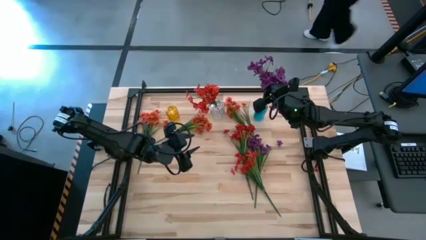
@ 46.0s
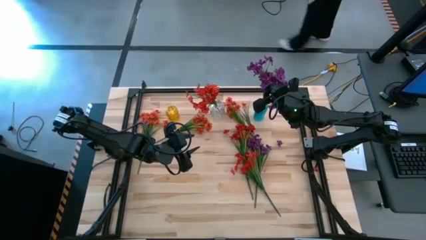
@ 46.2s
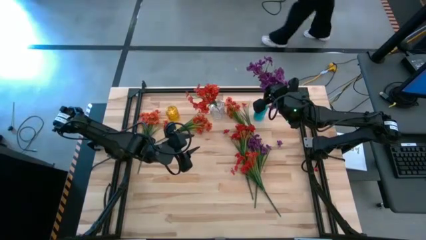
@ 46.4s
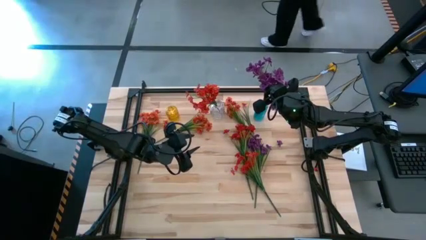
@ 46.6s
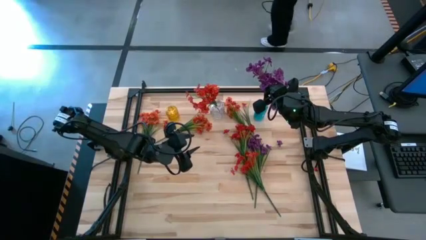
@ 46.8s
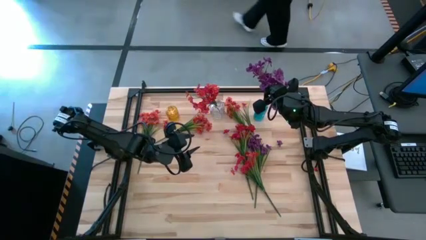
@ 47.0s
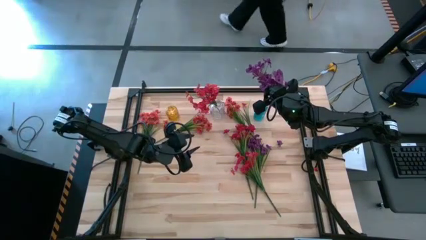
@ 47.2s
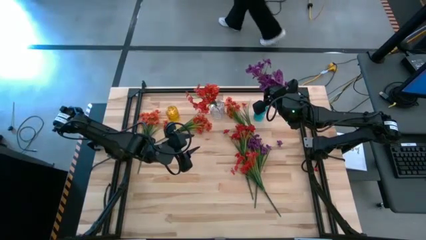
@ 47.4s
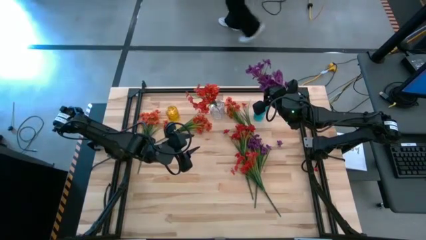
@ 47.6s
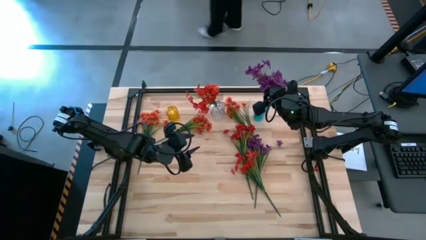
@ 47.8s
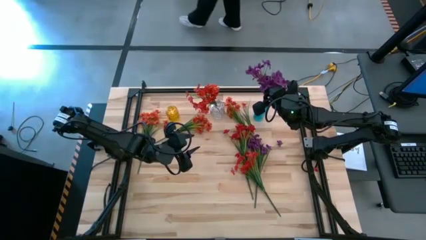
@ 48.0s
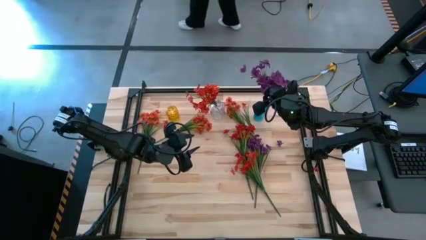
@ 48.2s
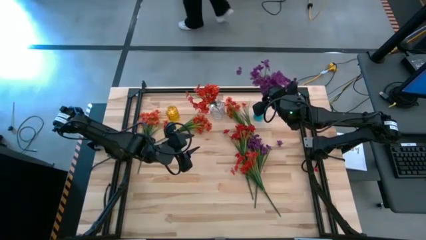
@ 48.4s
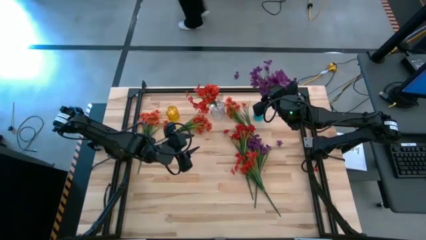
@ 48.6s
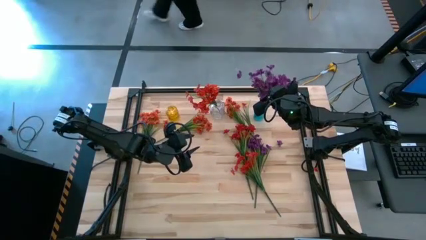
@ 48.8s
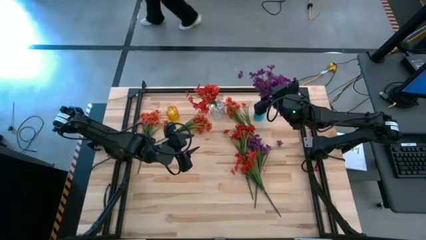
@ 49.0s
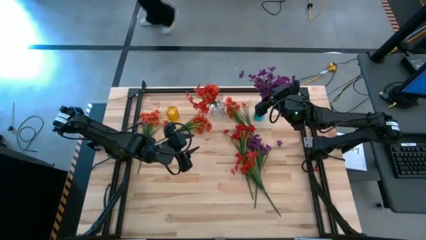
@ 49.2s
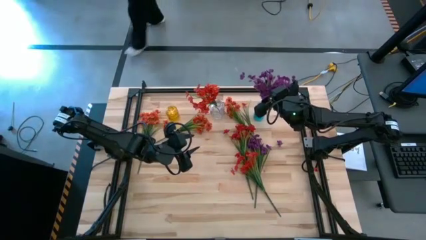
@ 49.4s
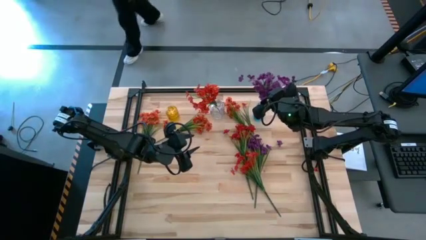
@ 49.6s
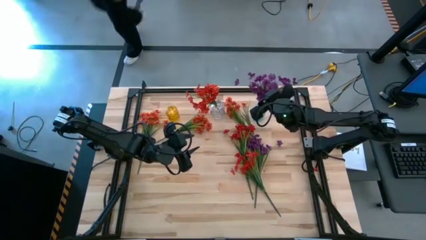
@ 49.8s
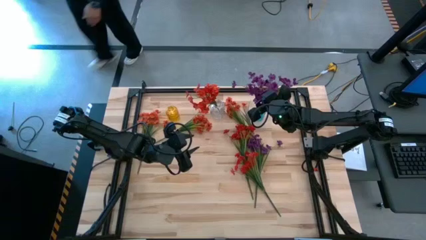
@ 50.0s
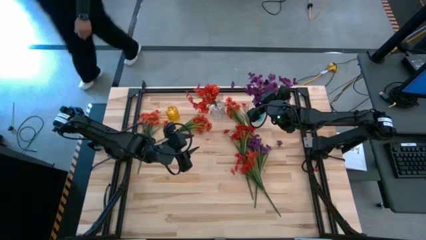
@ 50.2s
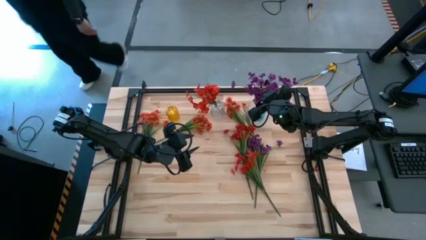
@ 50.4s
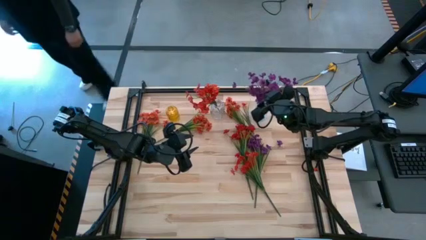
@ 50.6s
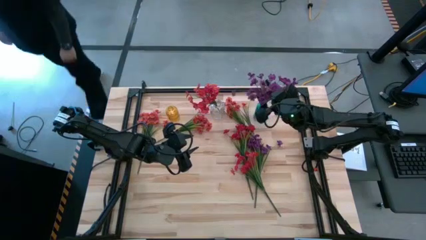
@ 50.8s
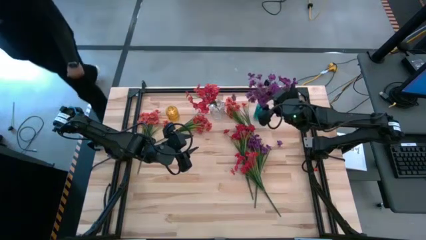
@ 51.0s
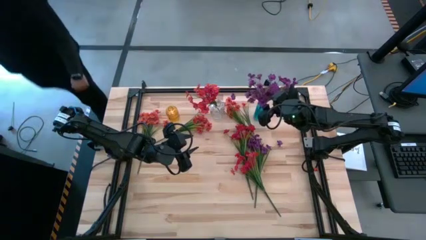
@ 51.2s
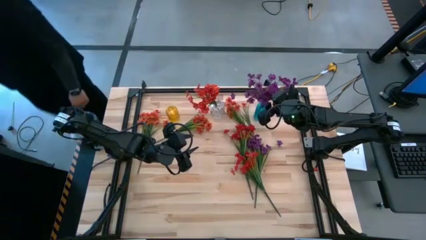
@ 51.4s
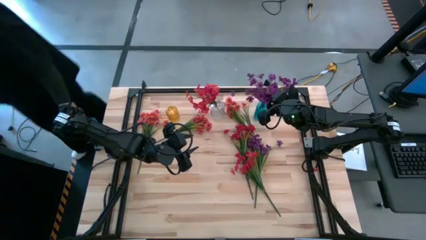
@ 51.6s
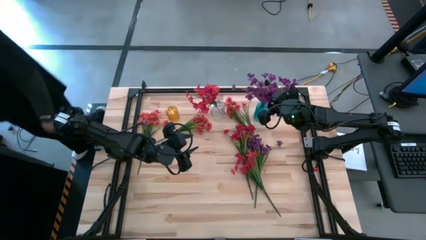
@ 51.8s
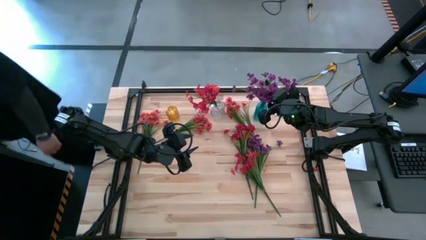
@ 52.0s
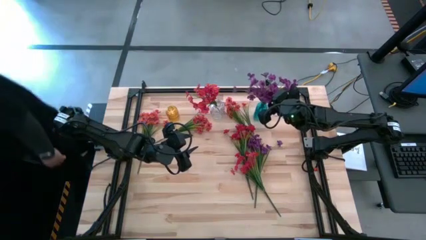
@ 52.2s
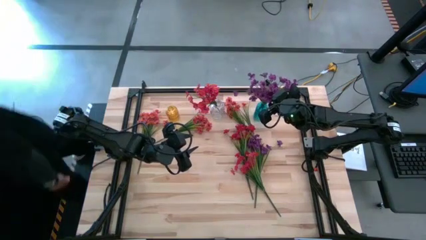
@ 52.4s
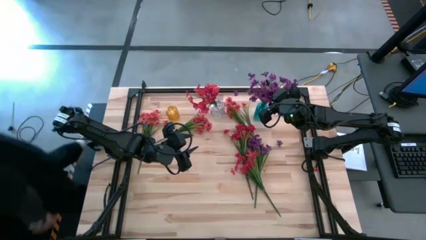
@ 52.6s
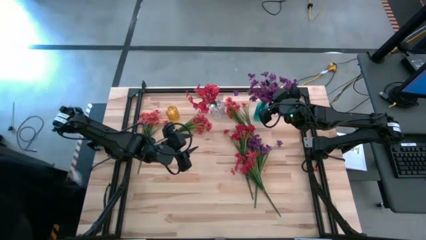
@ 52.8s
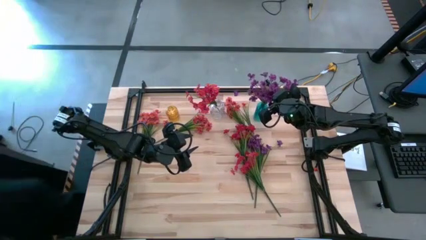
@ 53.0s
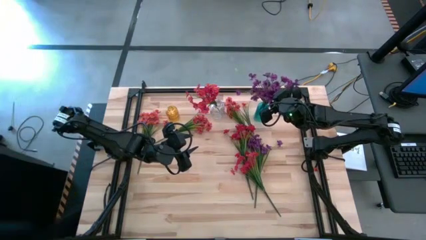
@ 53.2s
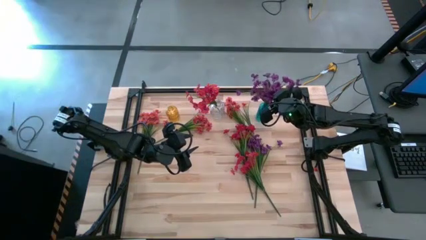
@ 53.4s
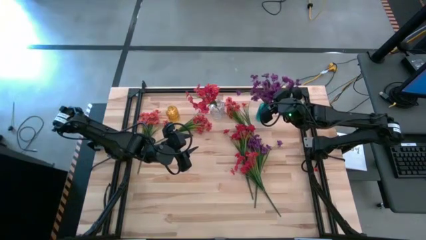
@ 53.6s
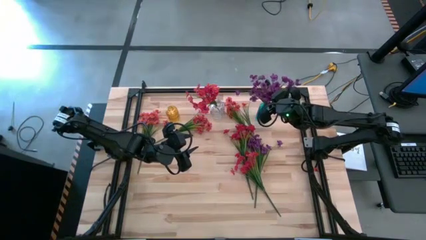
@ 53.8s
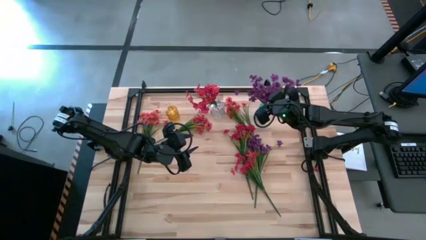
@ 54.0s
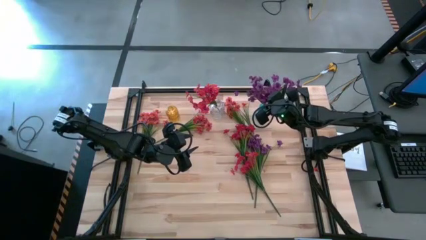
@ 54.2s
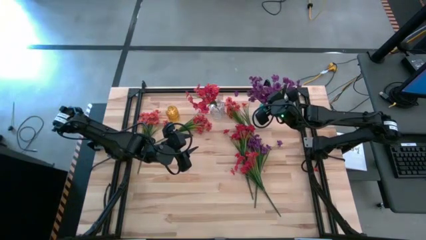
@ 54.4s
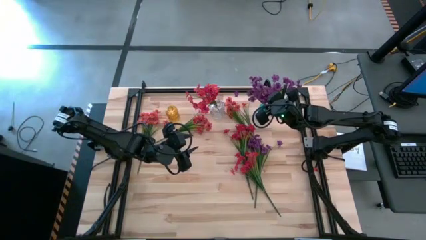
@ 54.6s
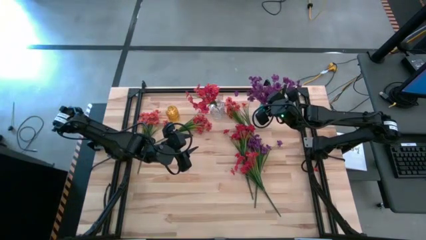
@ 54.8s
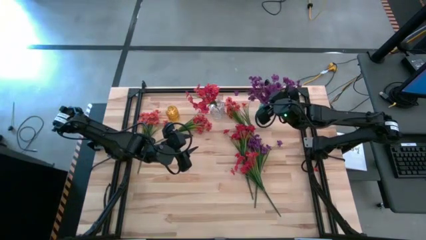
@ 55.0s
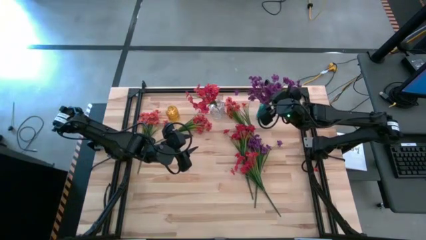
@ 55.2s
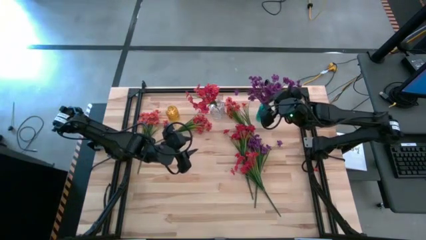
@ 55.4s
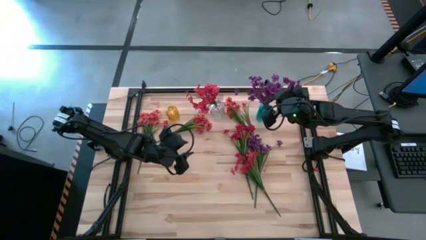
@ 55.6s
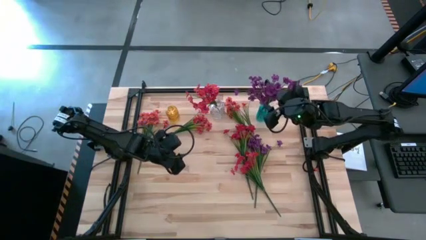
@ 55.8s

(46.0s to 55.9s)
Task: Sort flowers into vase by color
Put the purple flowers into the blue vase

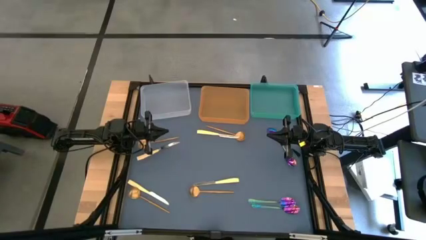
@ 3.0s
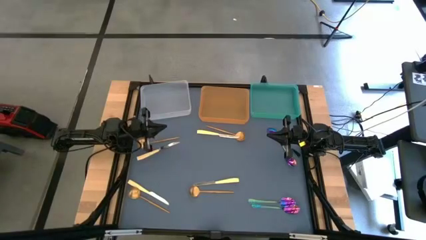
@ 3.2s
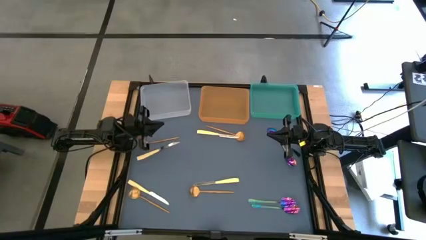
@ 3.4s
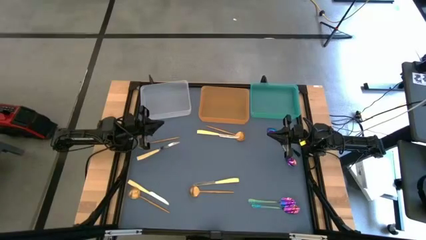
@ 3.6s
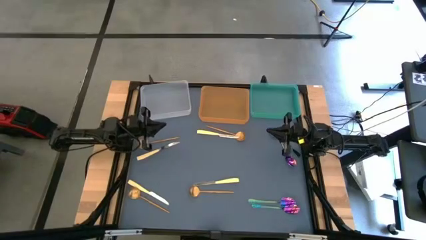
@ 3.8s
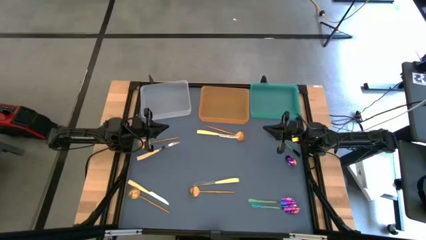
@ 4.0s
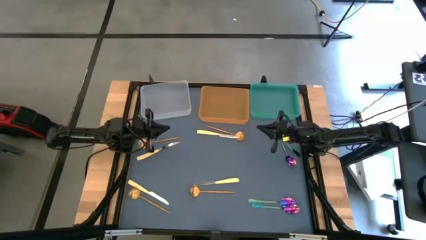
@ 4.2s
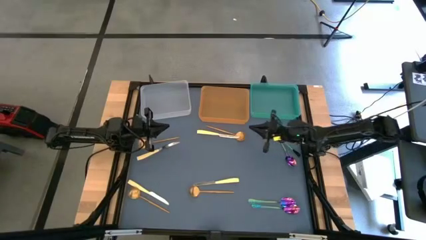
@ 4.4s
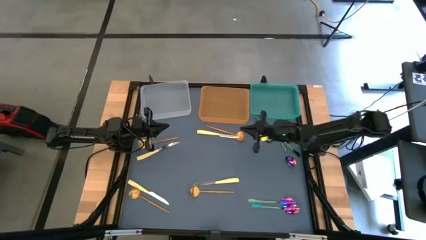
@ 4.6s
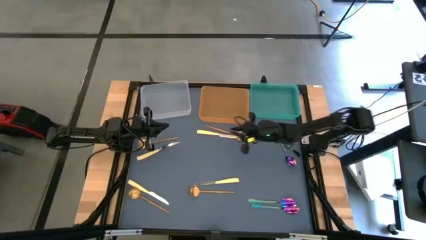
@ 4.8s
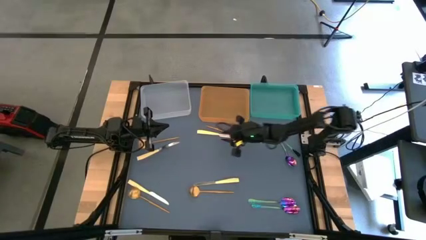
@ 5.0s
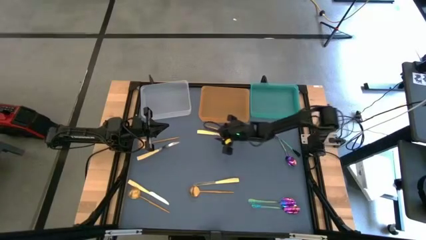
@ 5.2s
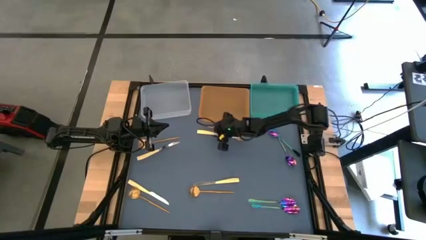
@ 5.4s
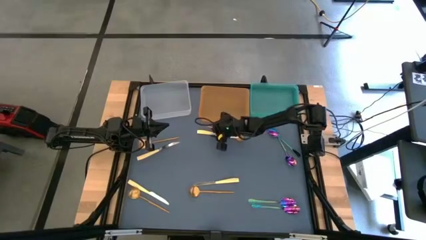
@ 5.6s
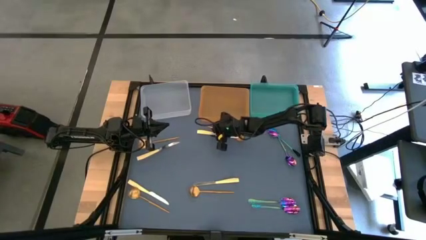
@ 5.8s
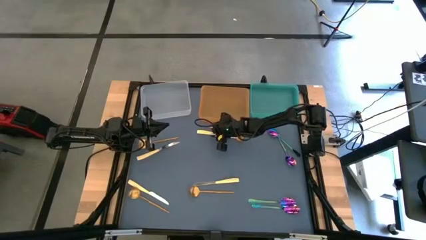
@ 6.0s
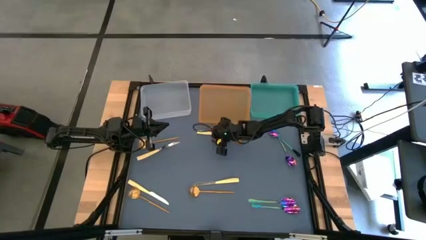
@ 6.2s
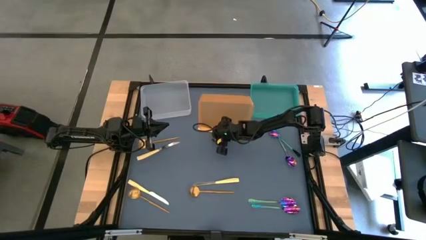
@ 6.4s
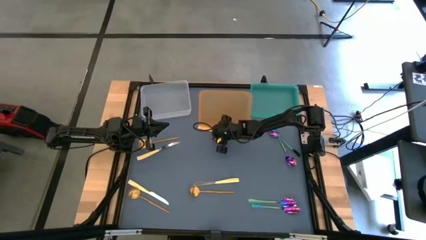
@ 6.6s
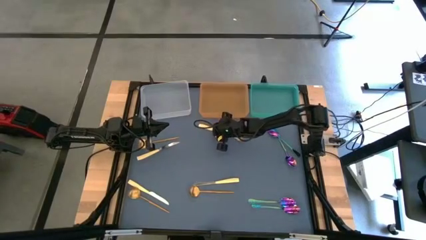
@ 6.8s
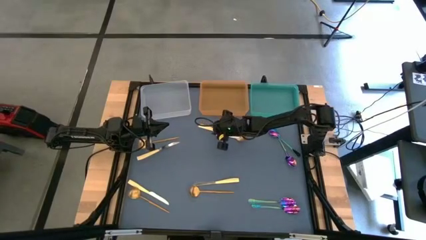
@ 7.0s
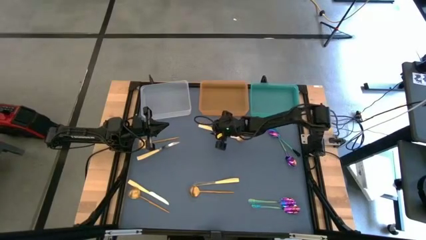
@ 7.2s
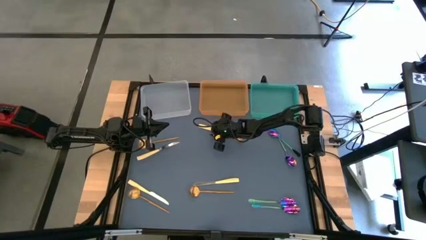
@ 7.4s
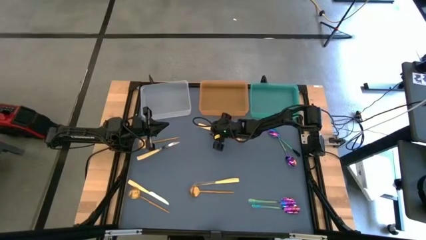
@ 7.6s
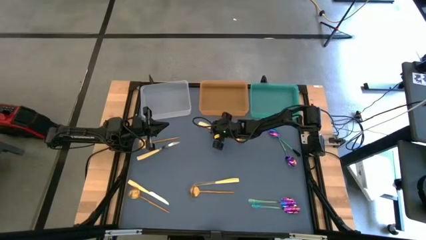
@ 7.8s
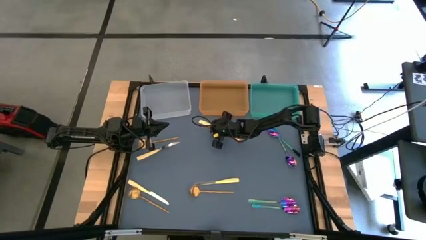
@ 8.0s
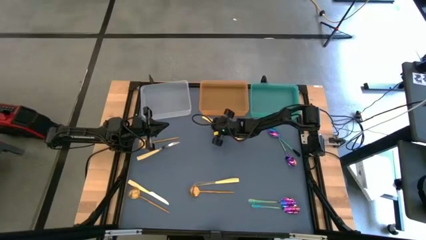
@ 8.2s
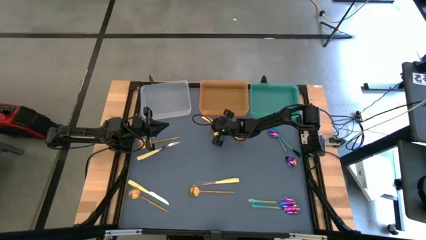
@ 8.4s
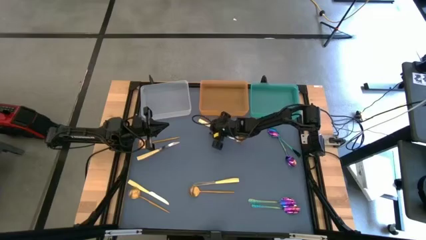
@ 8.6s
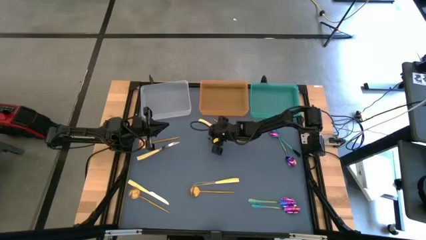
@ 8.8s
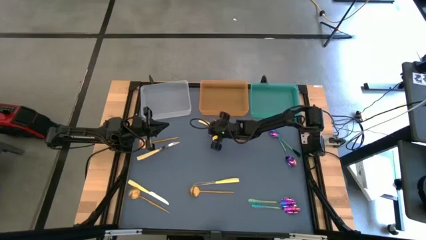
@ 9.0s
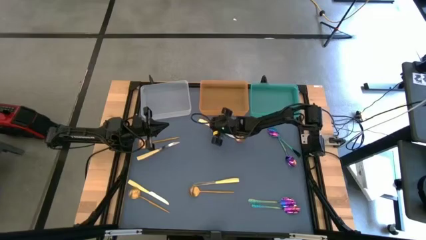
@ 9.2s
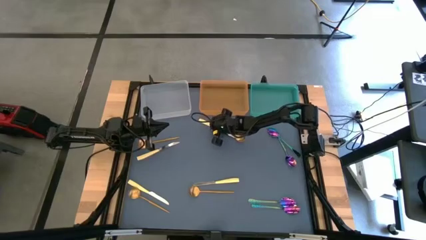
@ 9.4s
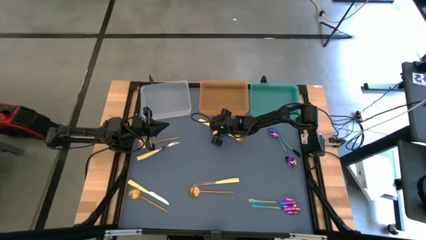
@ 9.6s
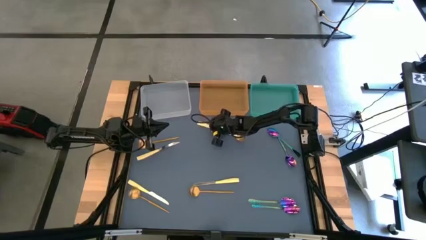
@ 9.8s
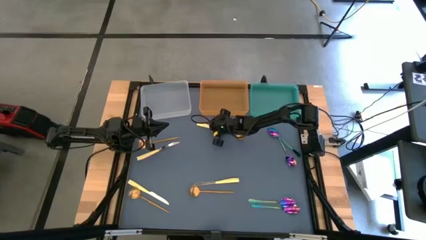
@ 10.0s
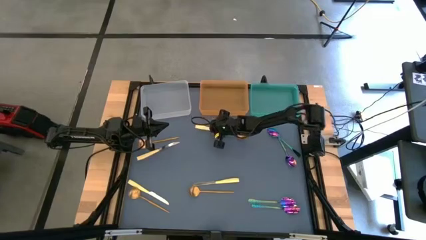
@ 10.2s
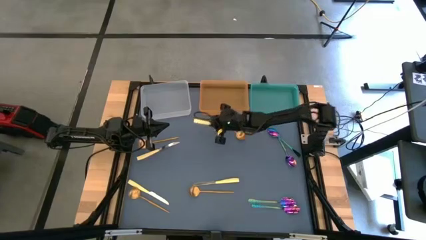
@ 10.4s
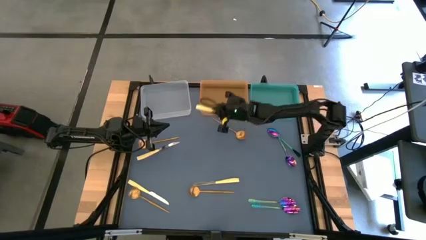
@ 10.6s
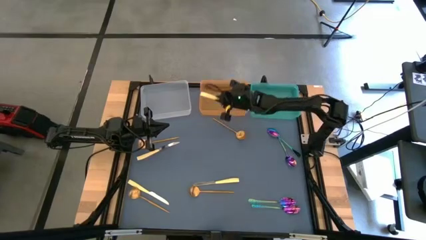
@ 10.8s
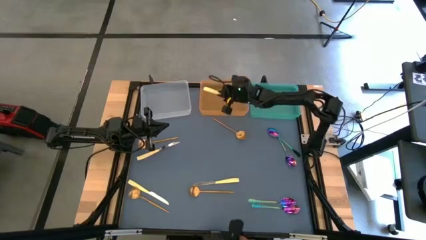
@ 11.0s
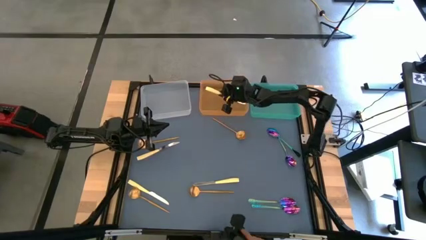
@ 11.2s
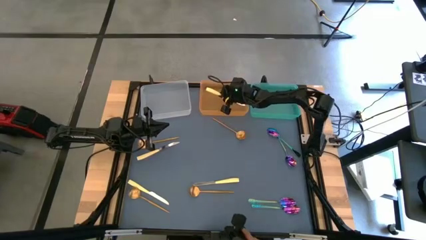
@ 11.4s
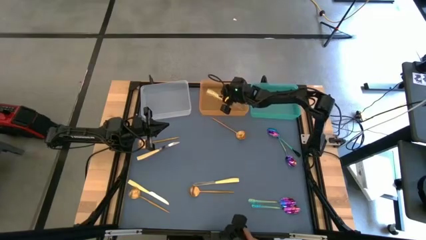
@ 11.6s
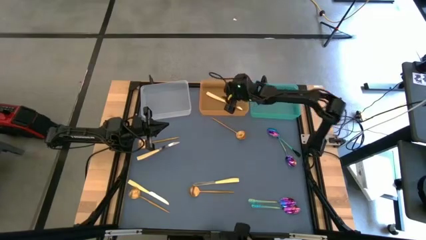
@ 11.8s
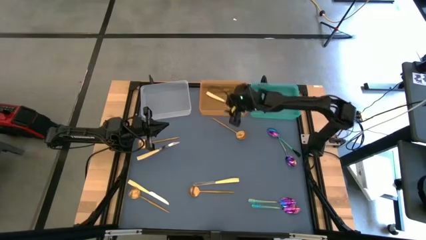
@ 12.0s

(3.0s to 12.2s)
Task: Sort silverware by color (type)
Put the yellow table knife into the orange bin
